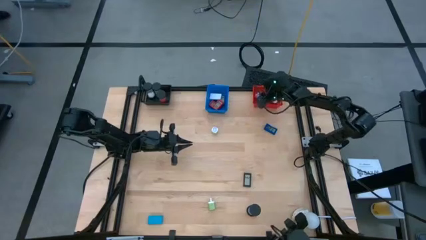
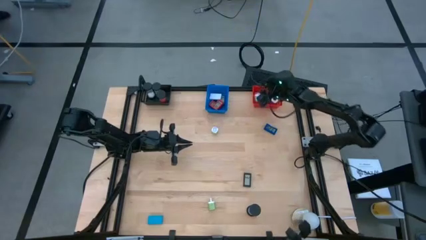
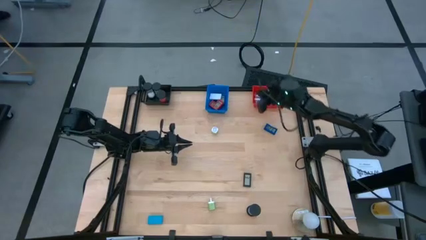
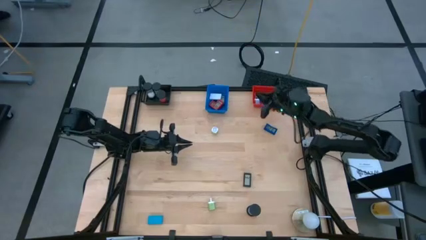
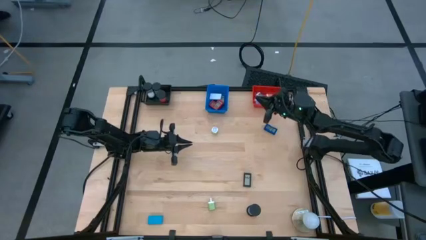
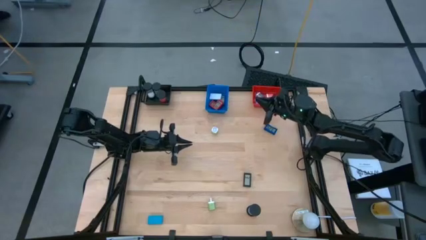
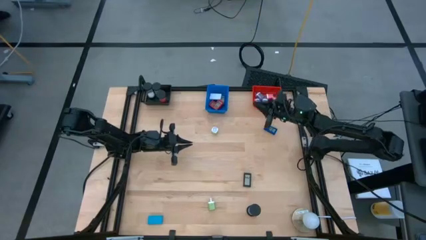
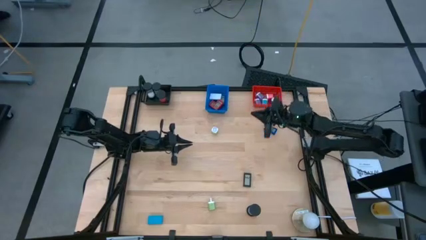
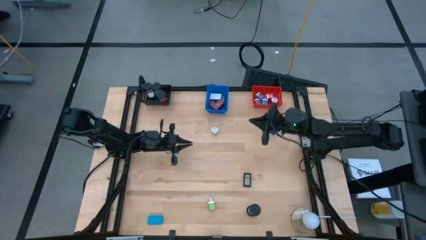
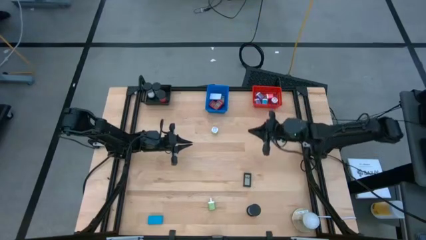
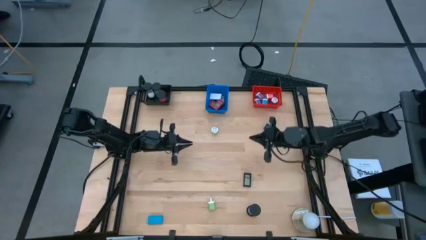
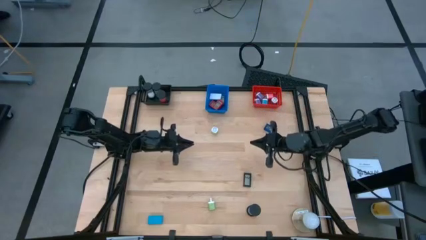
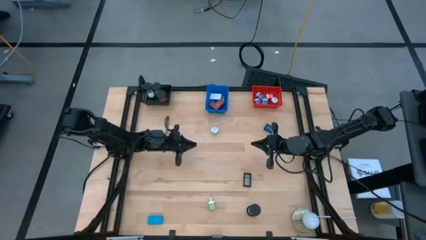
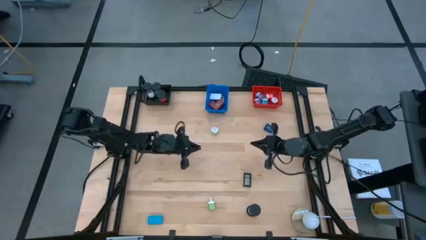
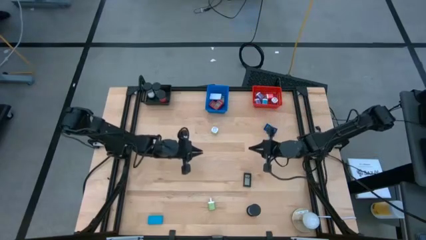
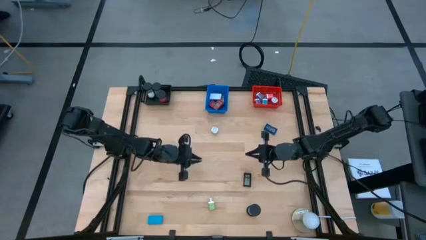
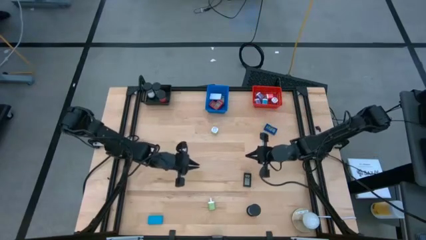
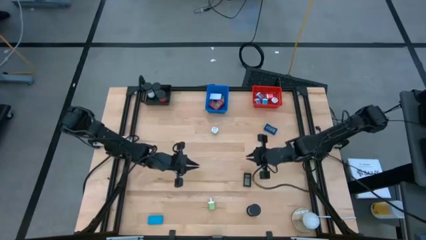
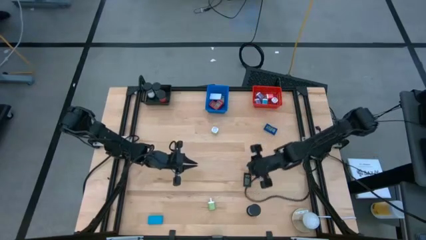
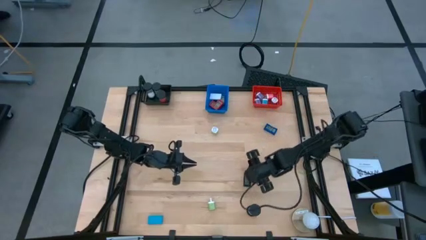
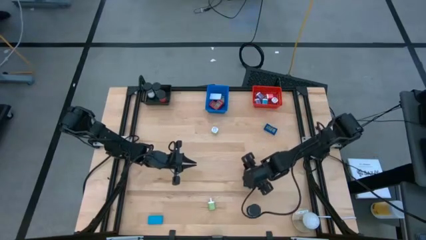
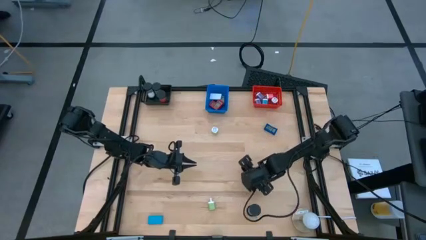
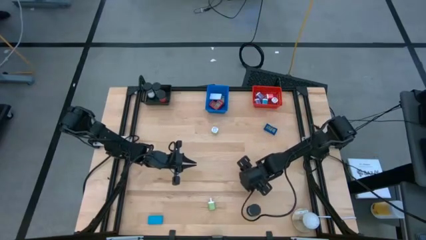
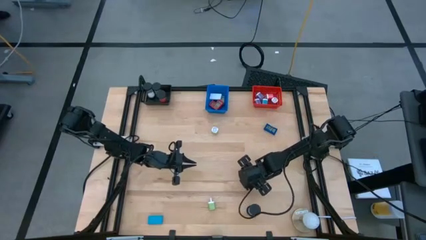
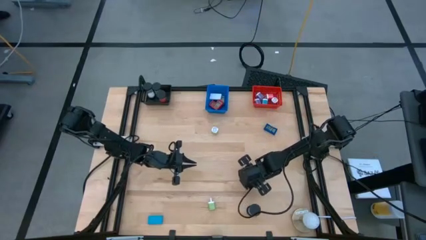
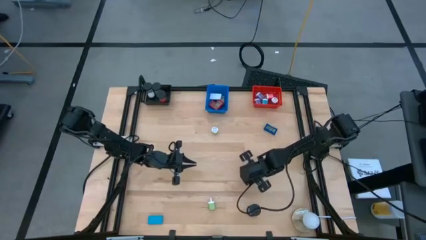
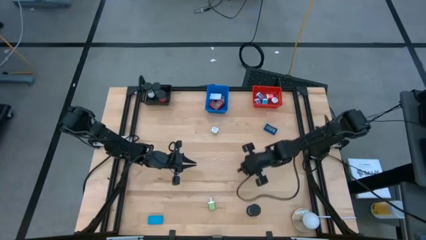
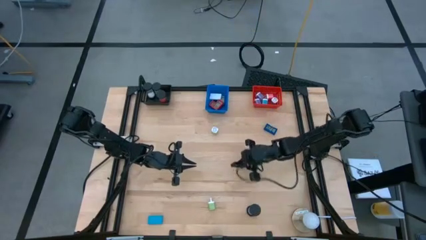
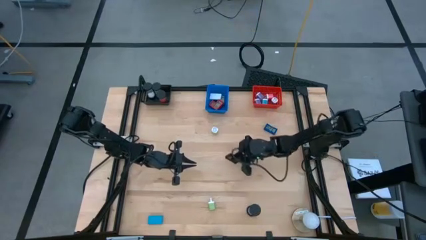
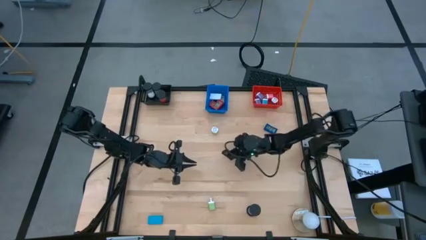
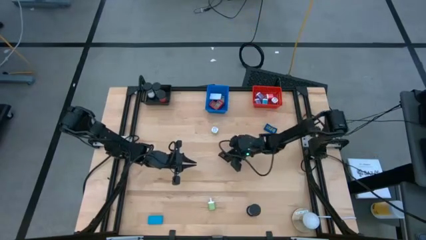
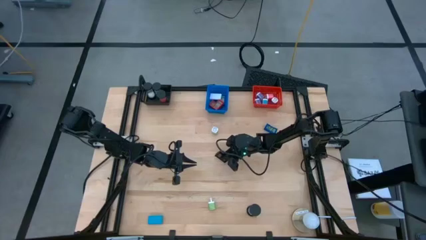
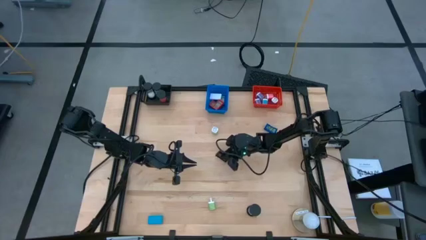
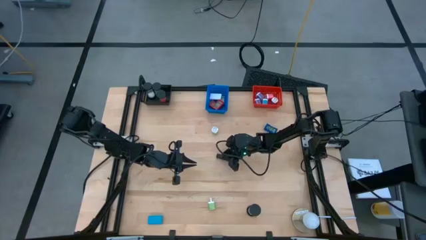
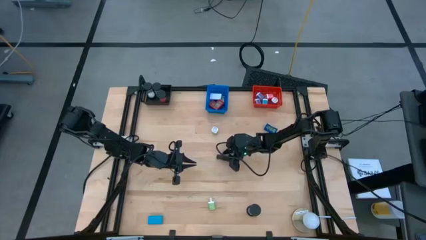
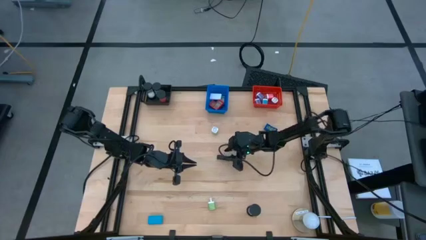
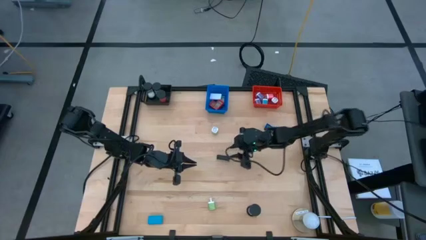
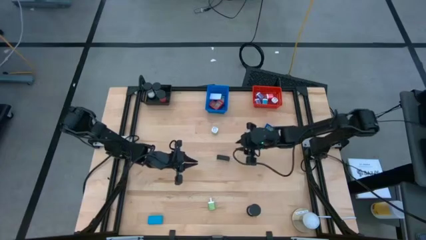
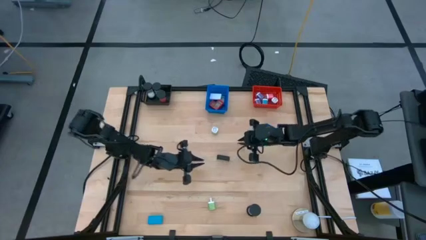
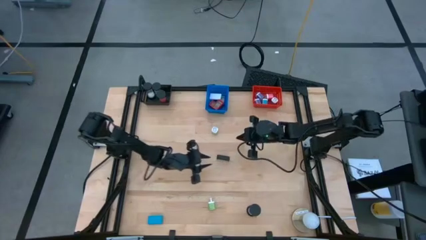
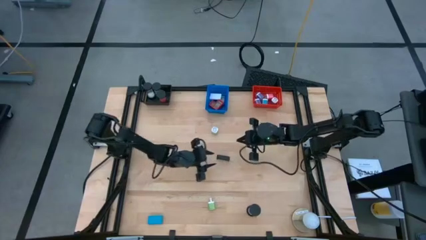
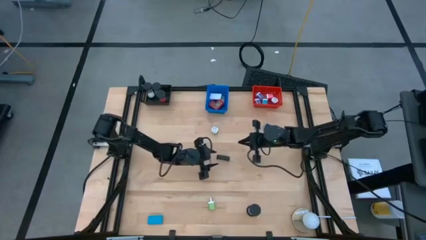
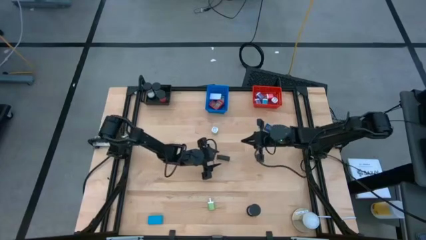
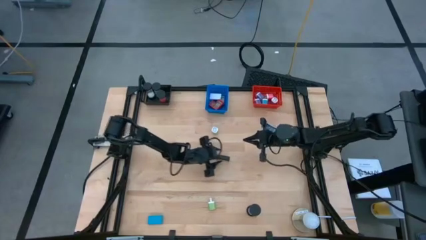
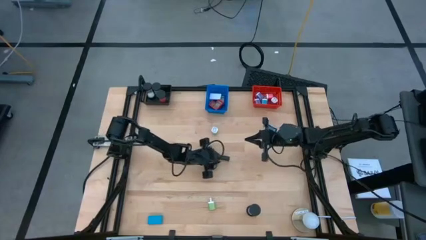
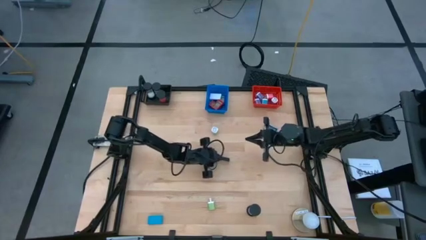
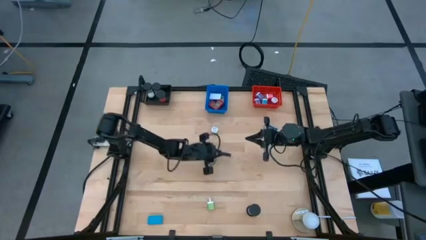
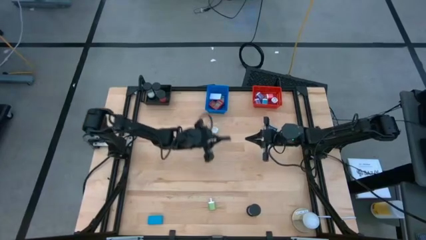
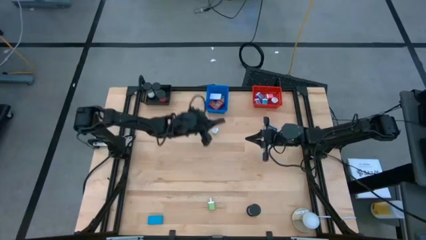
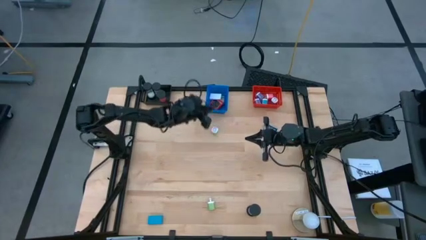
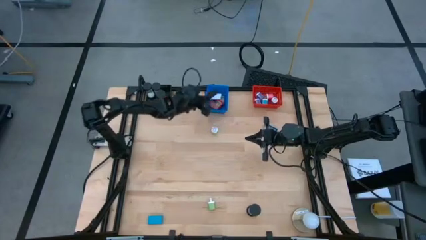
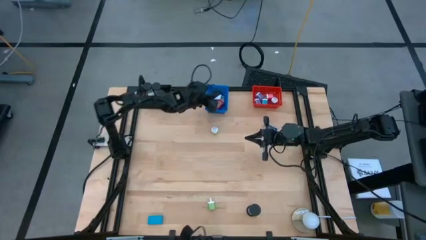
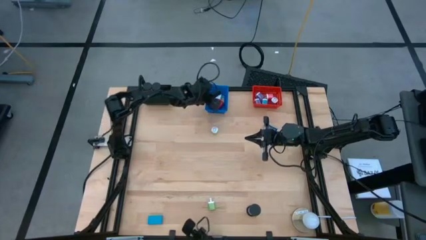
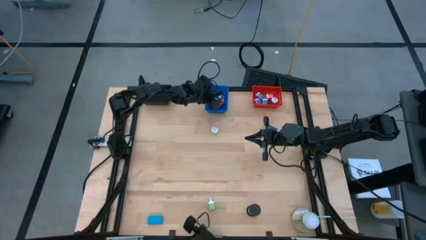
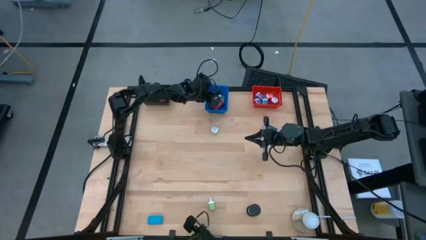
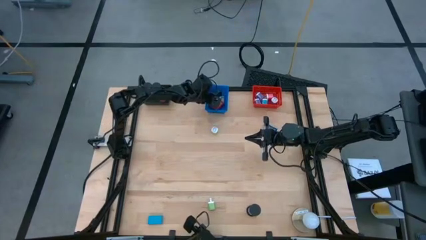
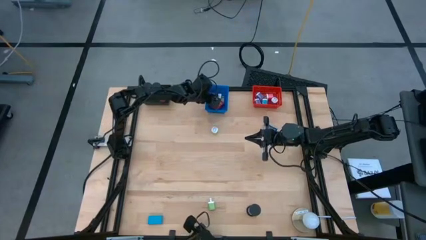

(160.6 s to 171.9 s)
Task: Pick & Place Office items
Put the black digital clock into the blue basket

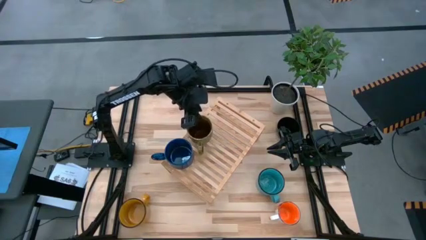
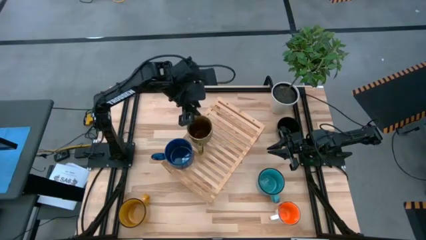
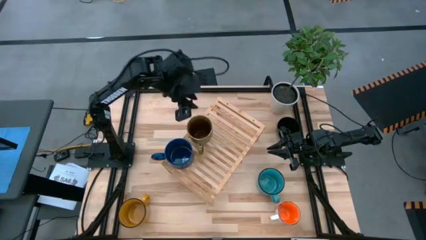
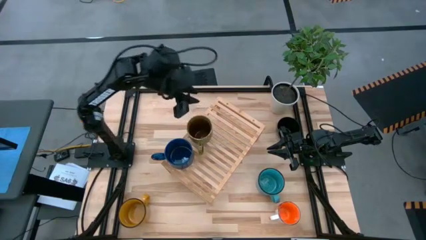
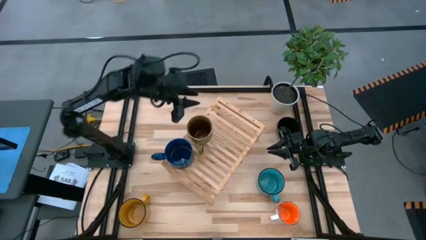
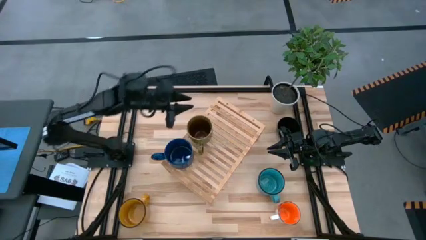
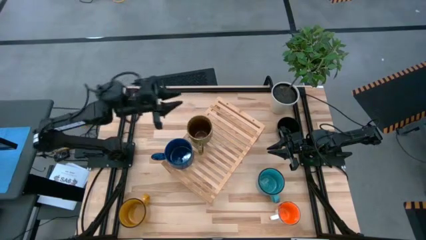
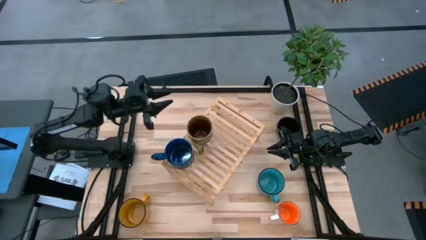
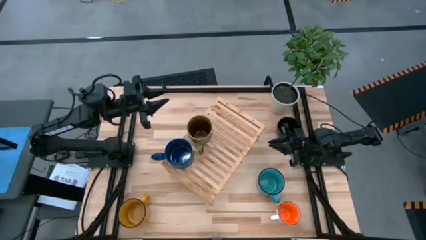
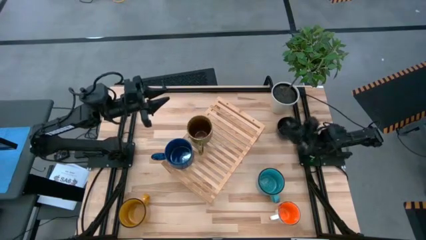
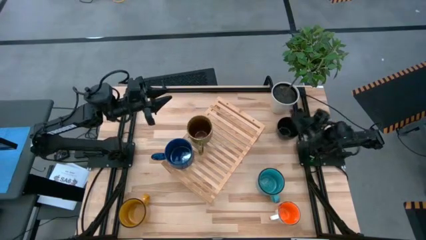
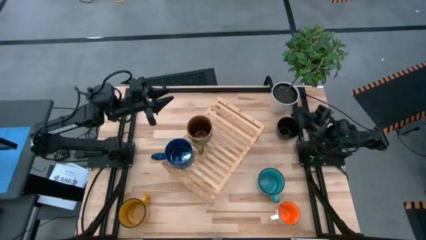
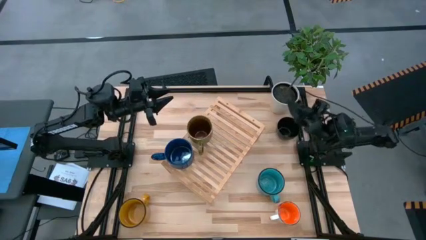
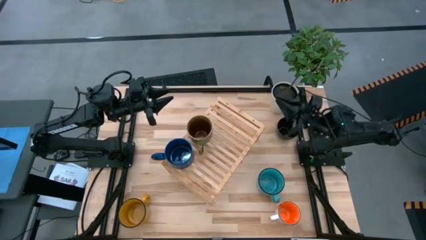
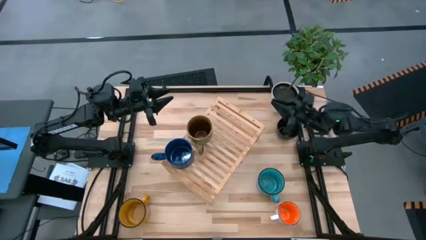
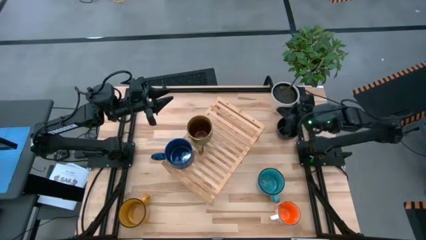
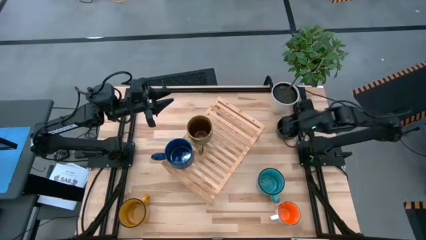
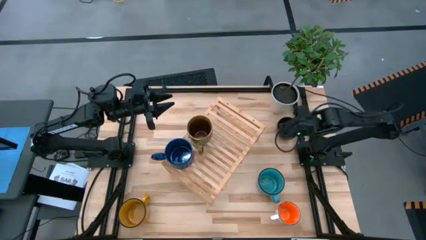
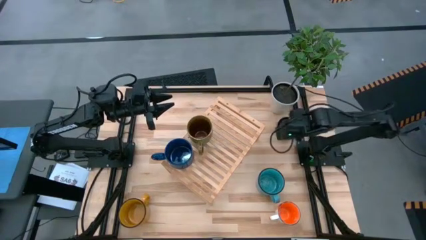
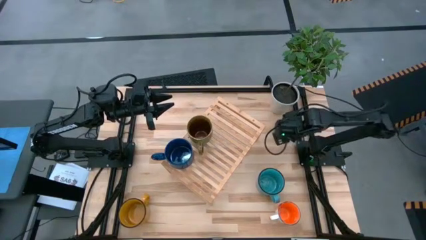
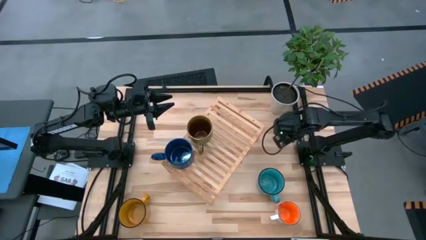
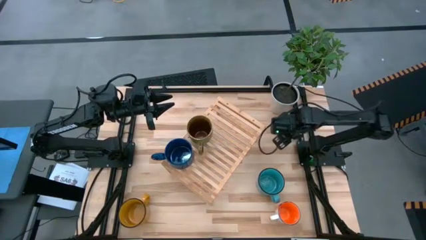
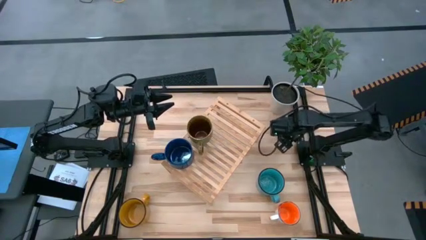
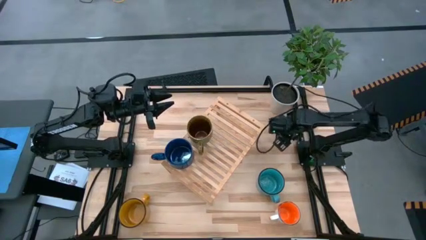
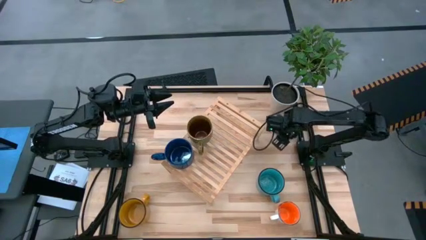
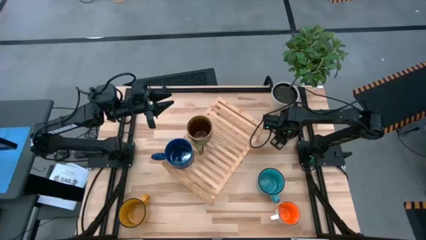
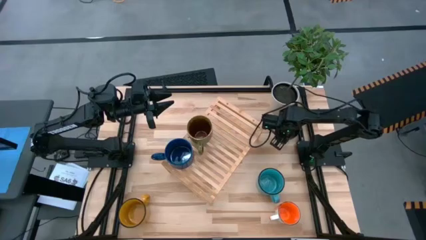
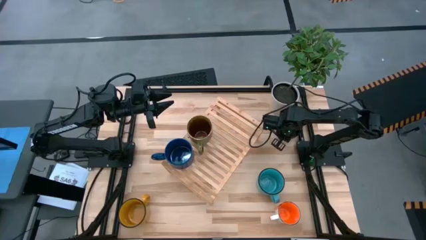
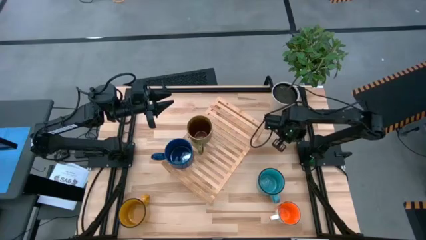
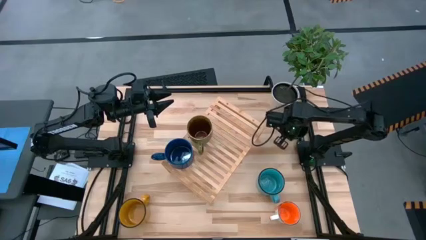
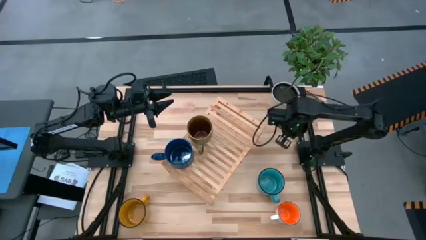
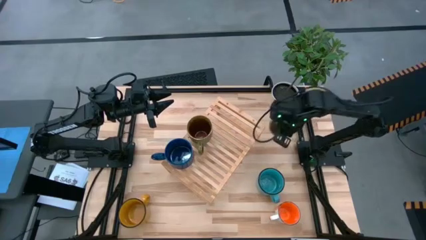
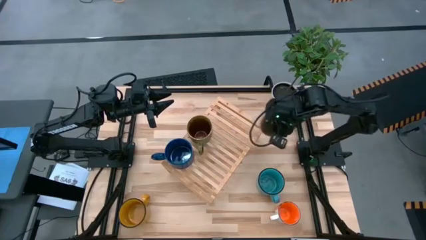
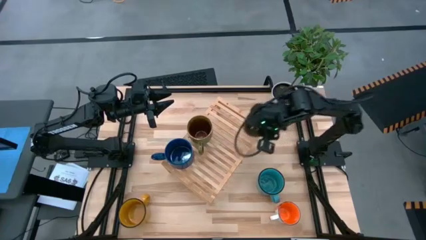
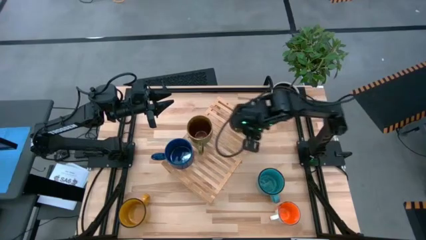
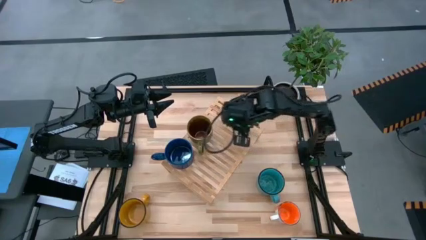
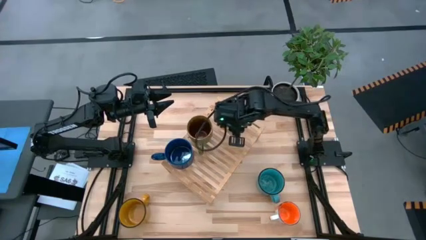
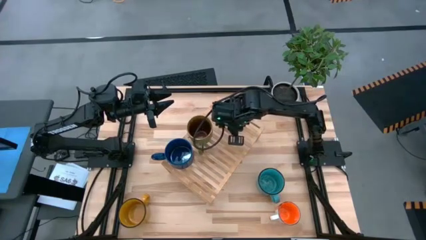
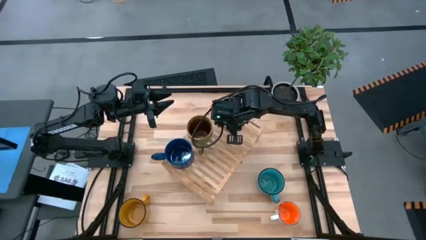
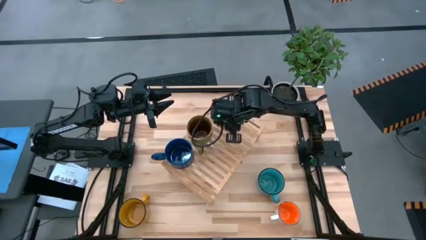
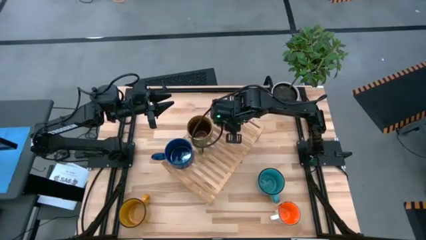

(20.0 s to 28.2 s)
Task: Place coffee mugs
Put the black mug onto the shelf
